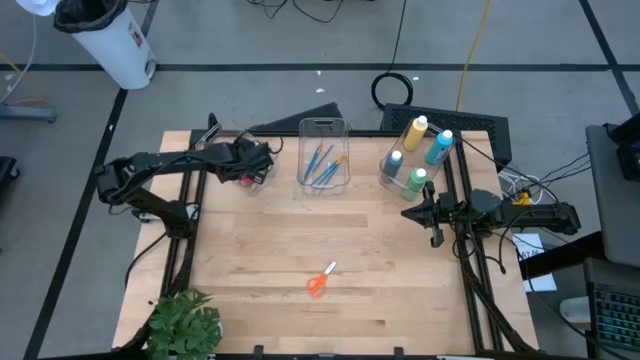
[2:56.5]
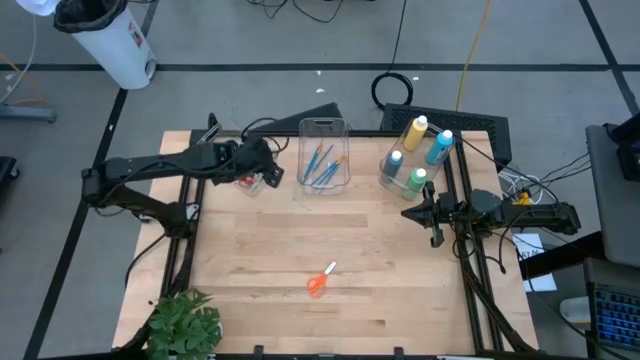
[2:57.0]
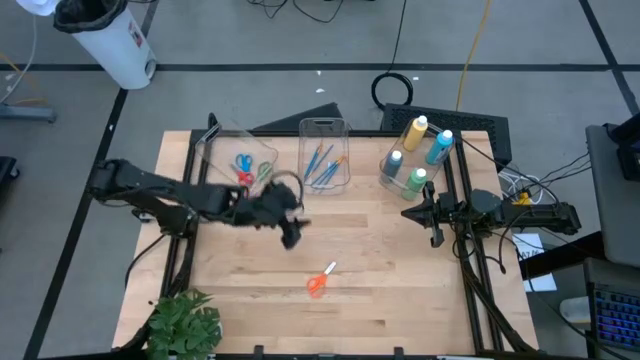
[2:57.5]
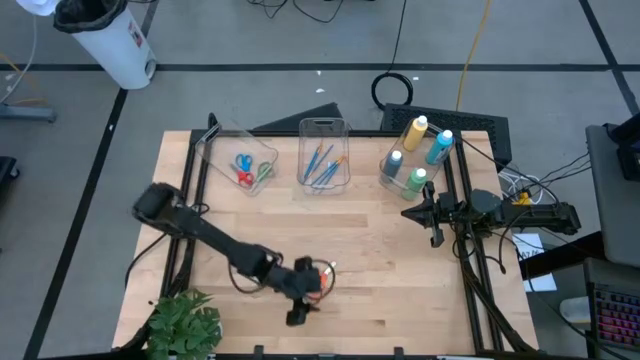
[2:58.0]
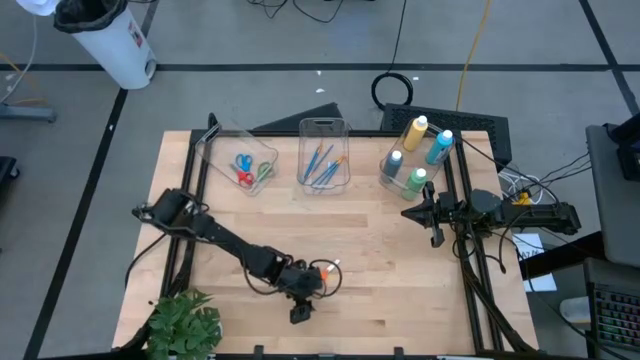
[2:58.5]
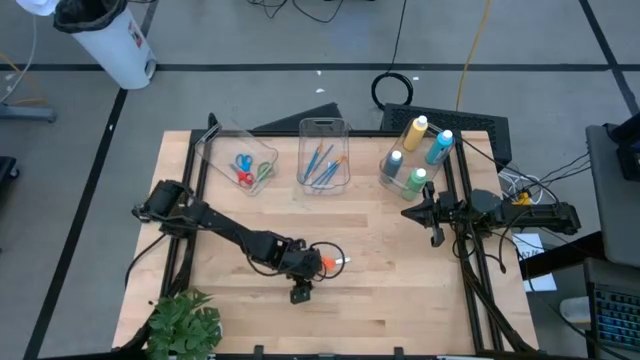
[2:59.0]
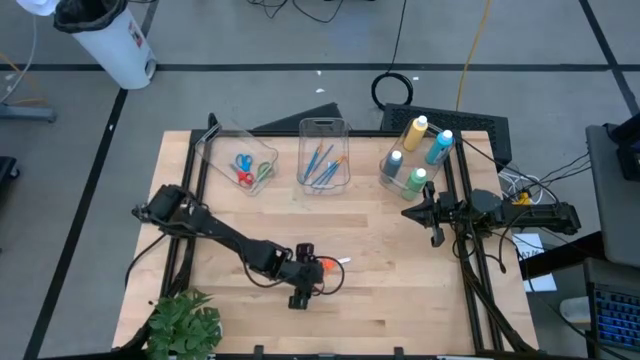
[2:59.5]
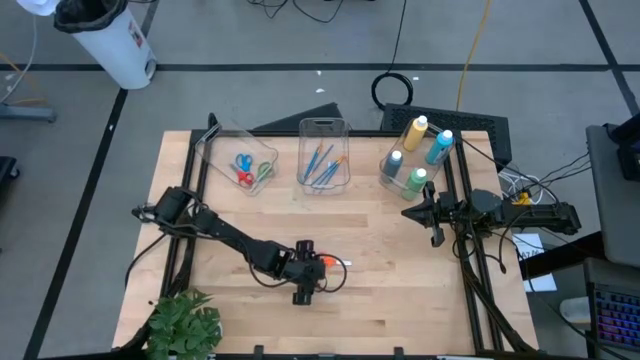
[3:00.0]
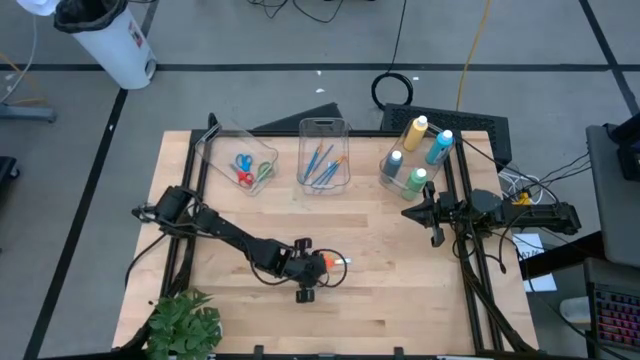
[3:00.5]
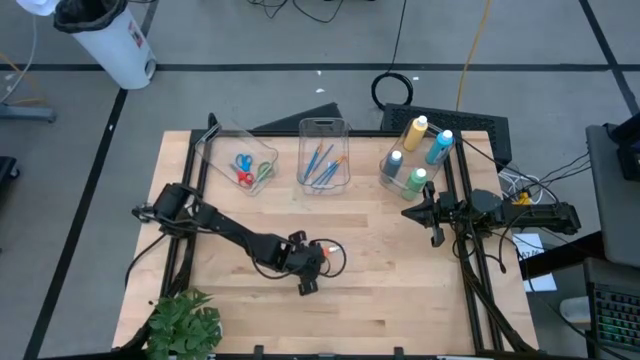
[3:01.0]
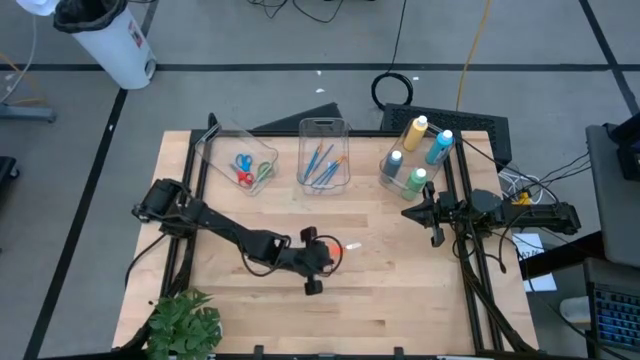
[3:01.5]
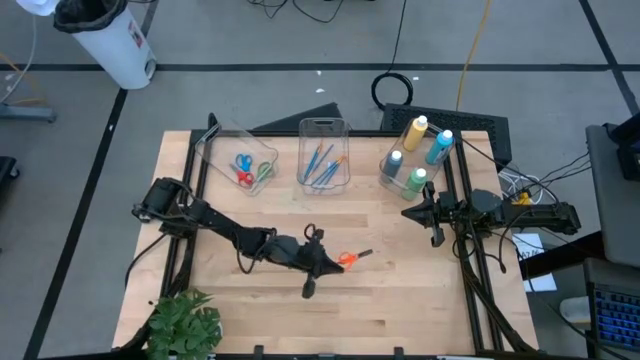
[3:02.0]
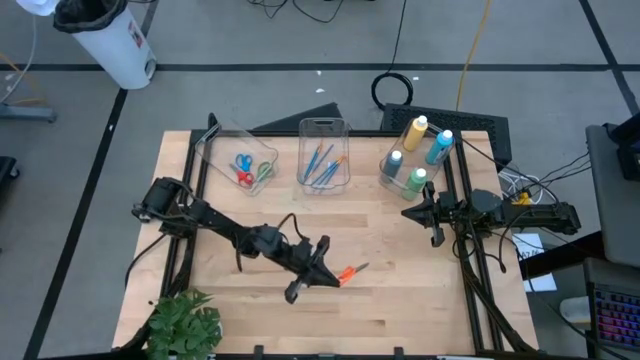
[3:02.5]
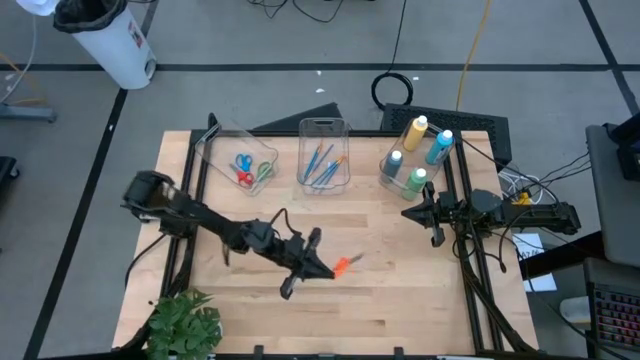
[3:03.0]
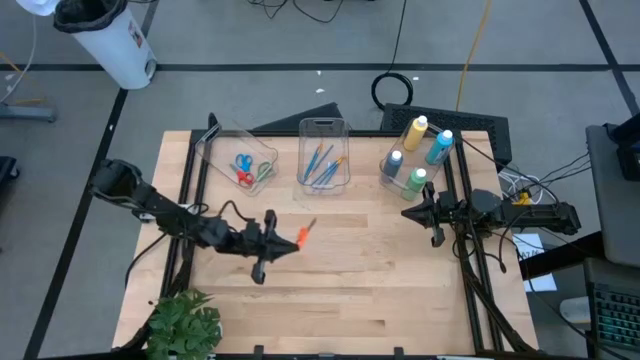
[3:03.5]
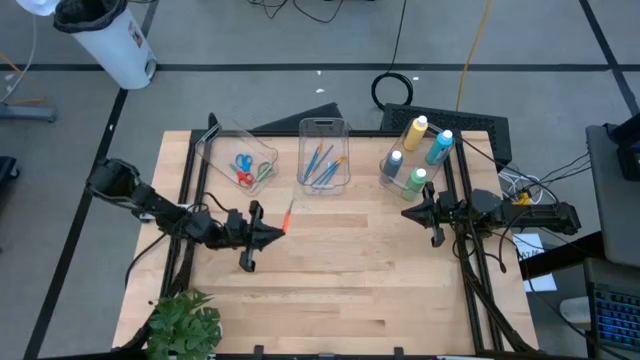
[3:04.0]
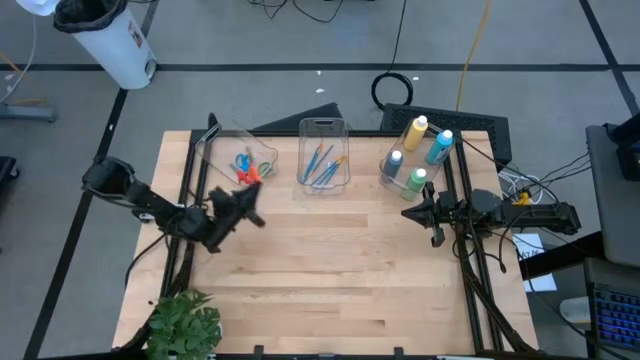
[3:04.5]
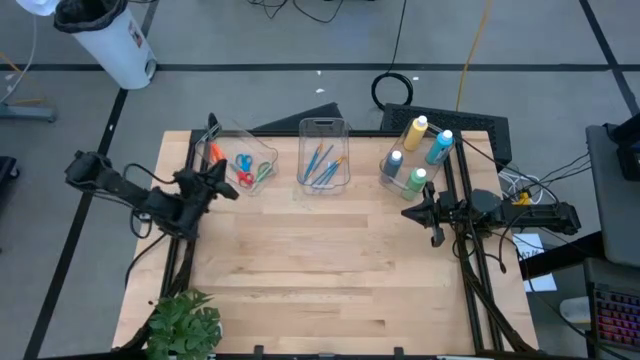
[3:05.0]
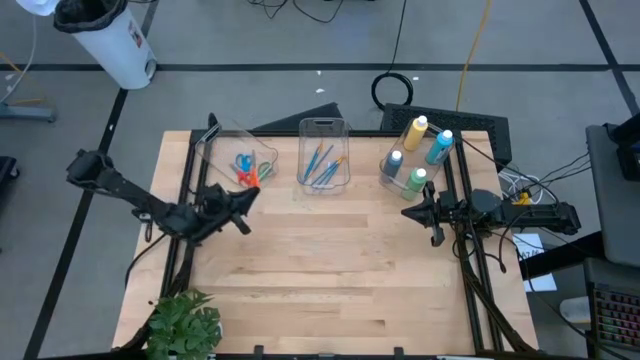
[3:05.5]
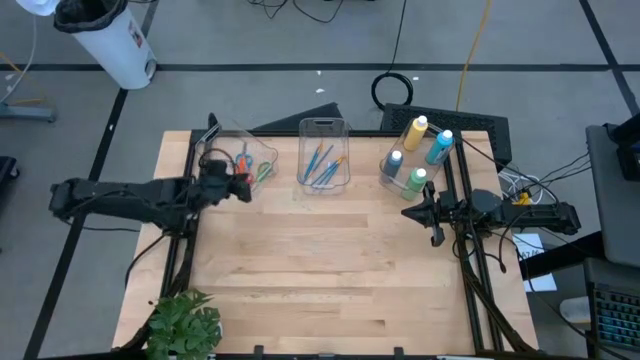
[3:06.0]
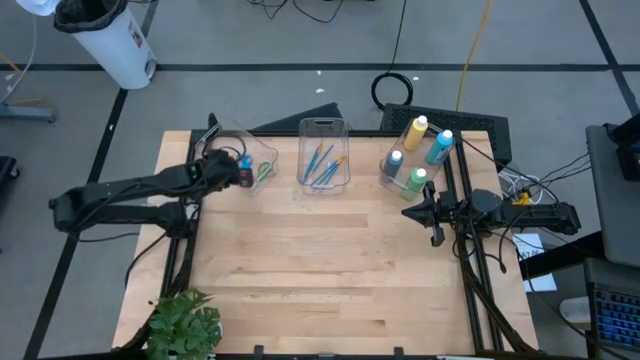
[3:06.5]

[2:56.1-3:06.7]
Task: Pick & Place Paint Supplies
Put the orange scissors into the left transparent bin

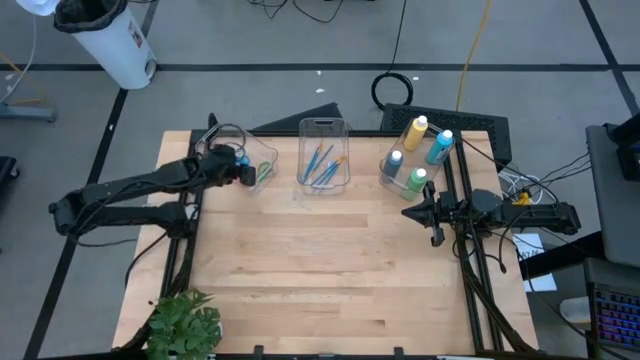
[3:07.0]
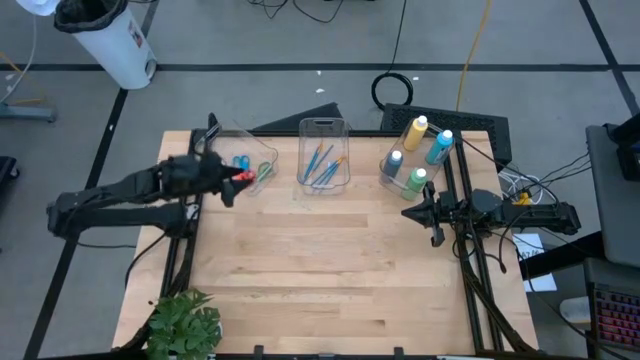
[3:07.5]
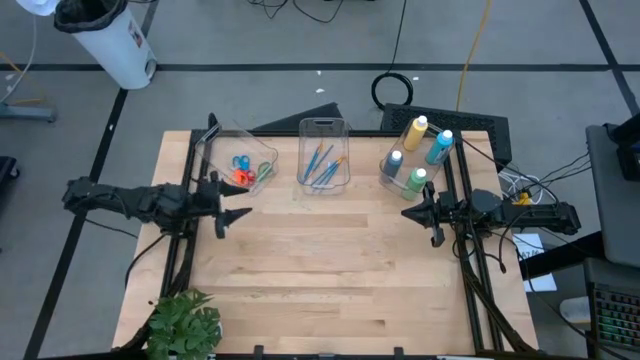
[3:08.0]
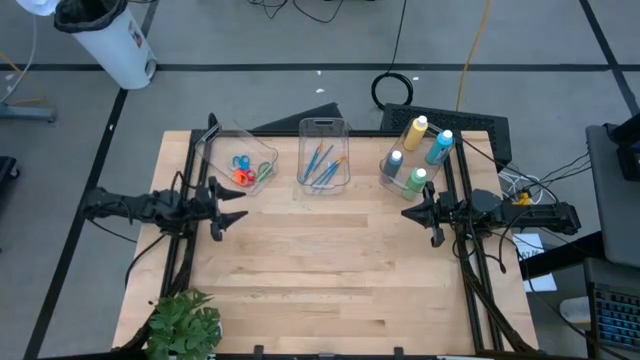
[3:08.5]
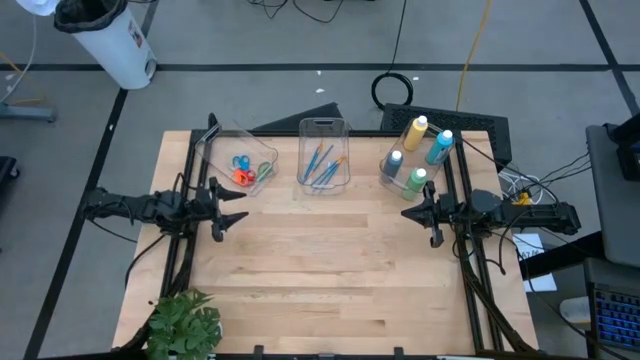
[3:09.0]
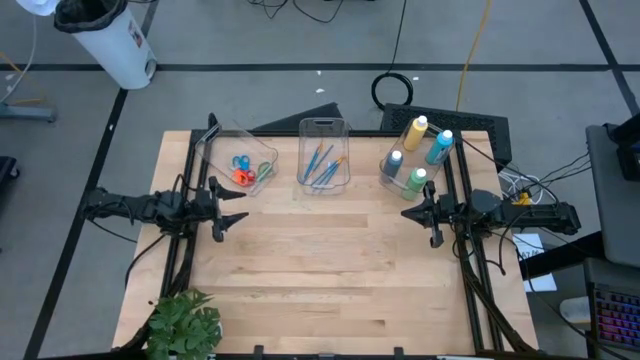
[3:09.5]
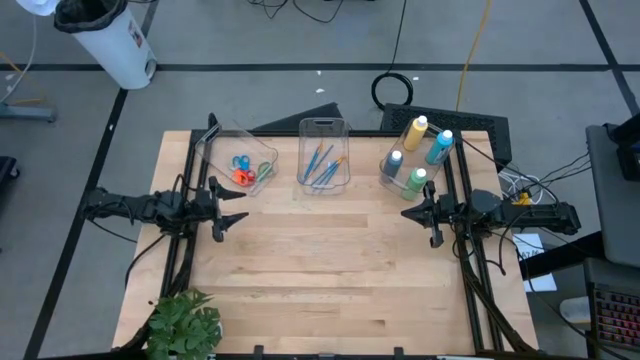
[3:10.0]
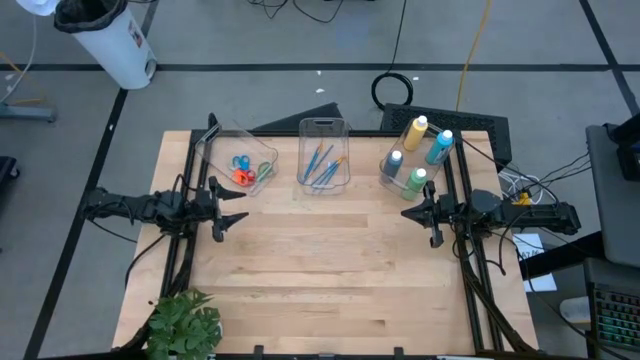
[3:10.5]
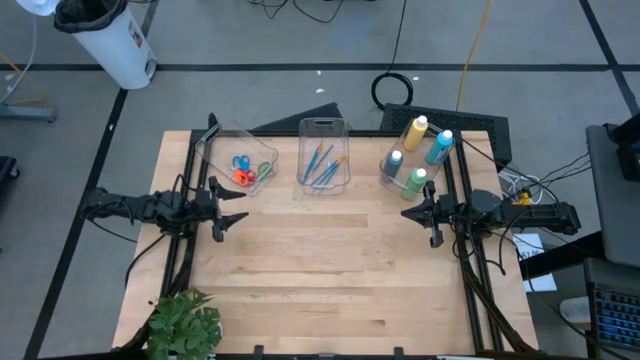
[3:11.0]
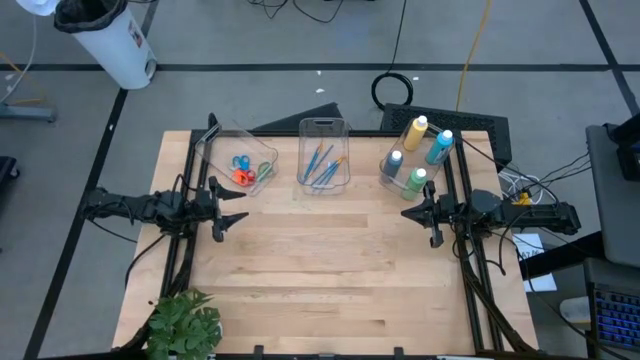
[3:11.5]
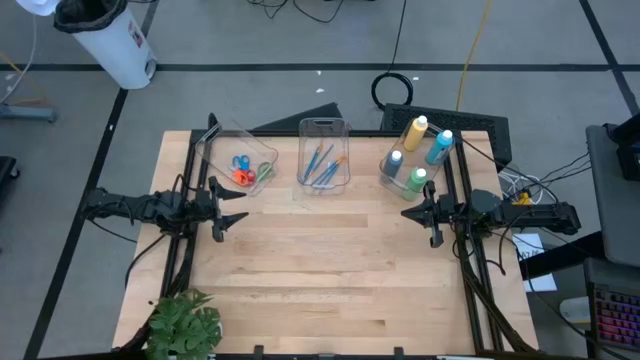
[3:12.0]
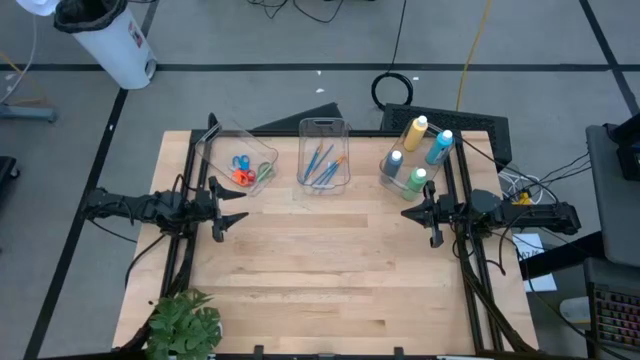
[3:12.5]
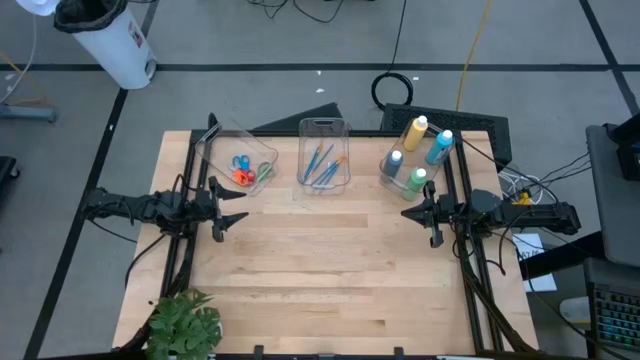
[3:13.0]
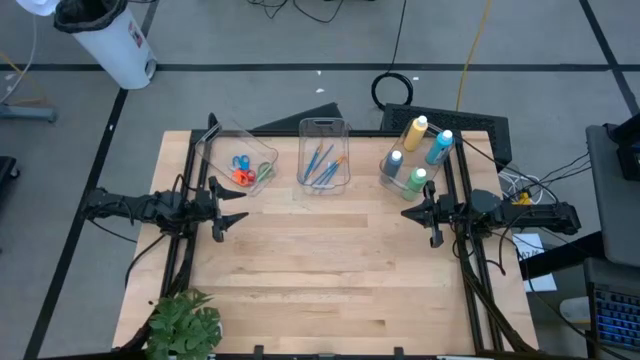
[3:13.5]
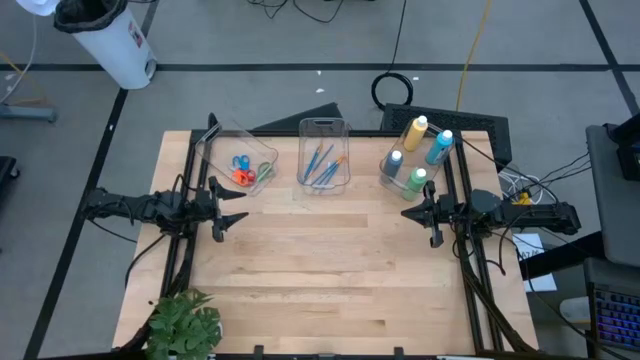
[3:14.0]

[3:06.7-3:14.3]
Return to Home Position

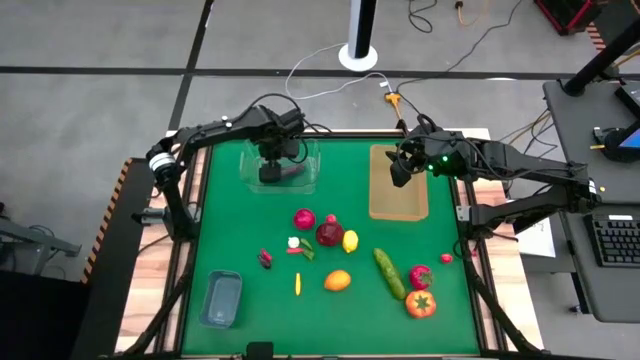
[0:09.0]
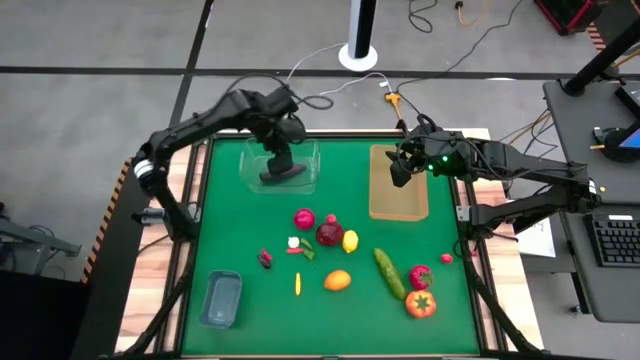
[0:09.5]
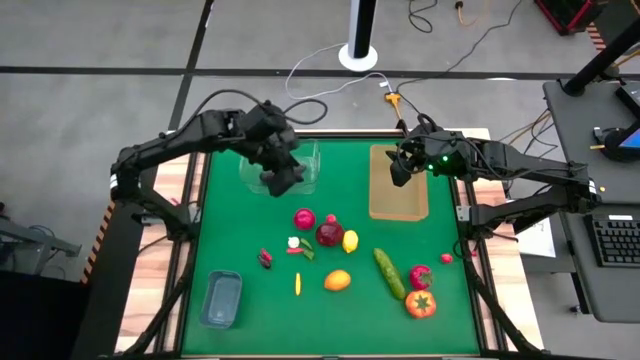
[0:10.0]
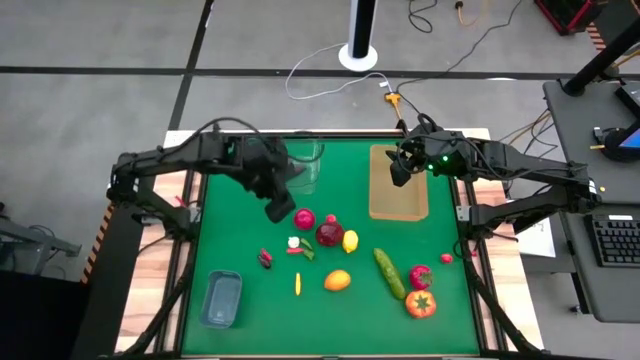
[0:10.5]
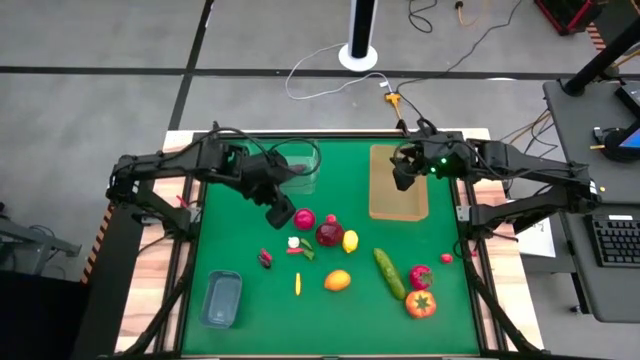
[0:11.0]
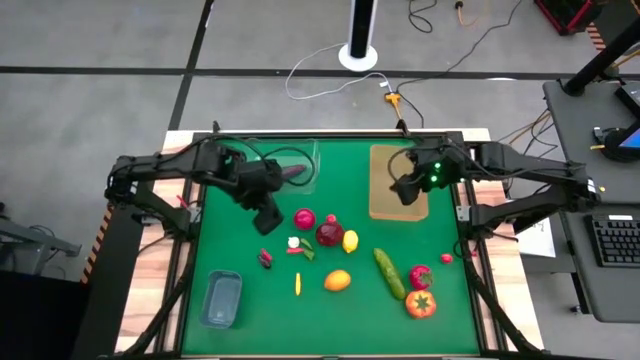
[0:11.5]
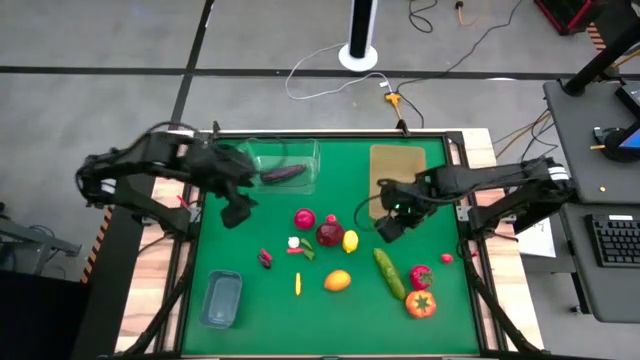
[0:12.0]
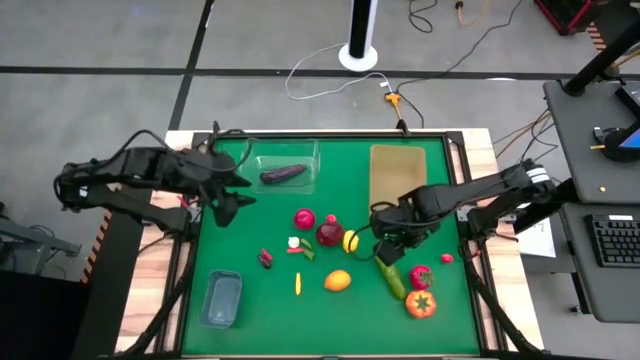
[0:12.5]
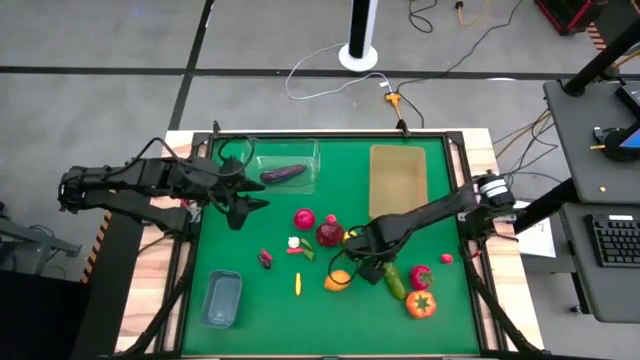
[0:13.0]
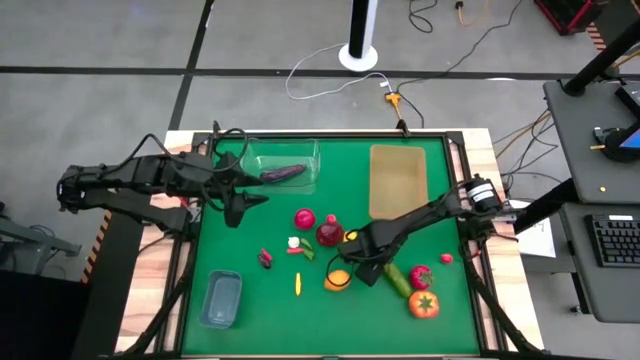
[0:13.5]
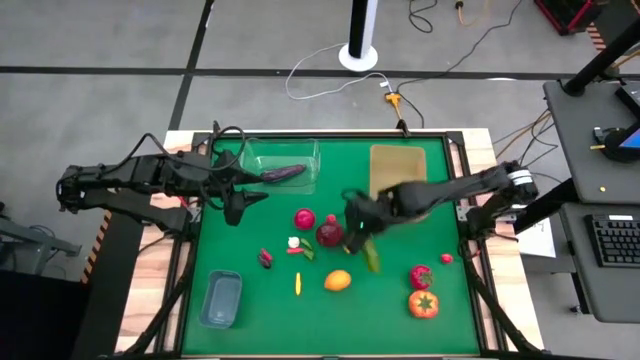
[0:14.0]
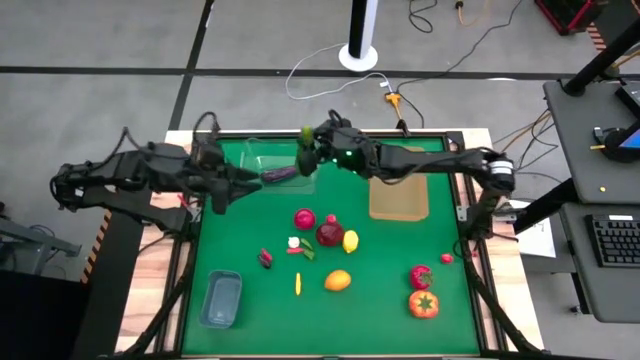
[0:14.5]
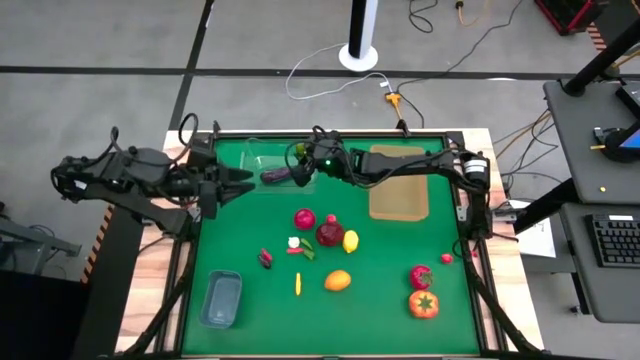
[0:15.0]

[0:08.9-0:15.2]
Task: Sort produce into baskets
Put the green cucumber into the transparent bin
